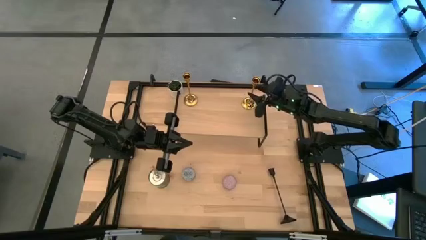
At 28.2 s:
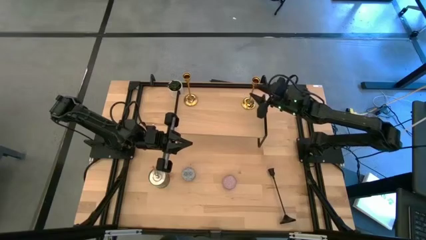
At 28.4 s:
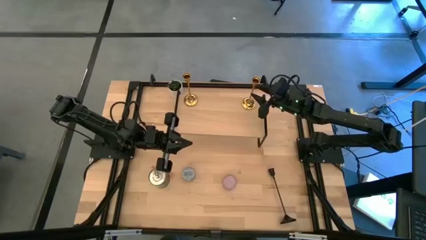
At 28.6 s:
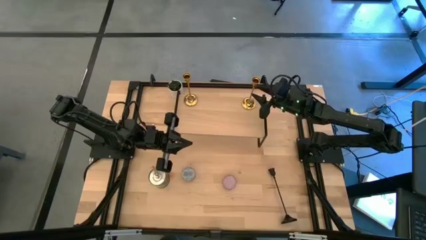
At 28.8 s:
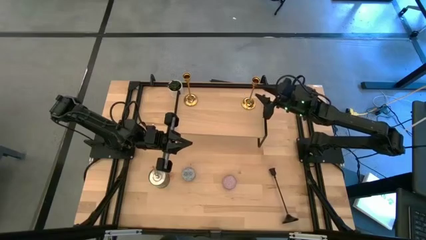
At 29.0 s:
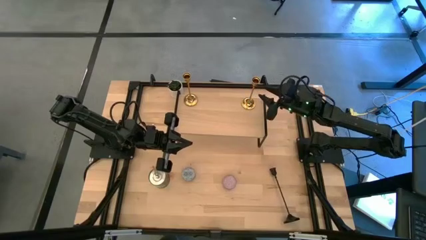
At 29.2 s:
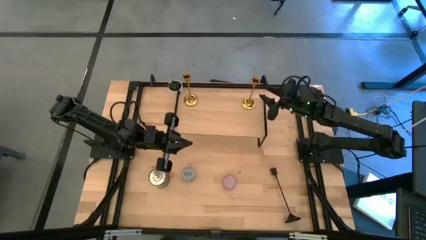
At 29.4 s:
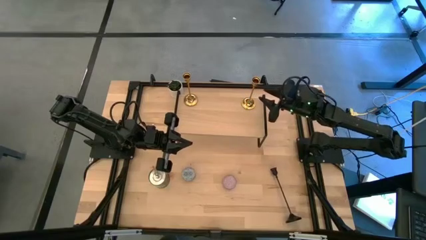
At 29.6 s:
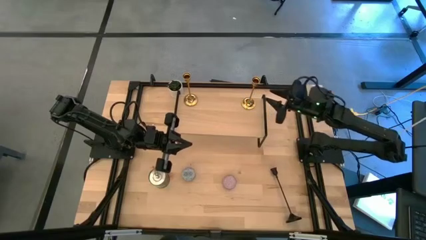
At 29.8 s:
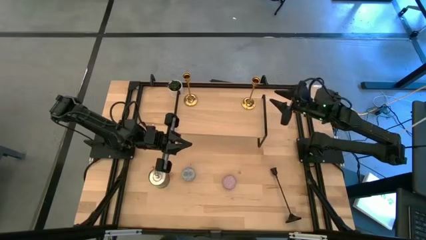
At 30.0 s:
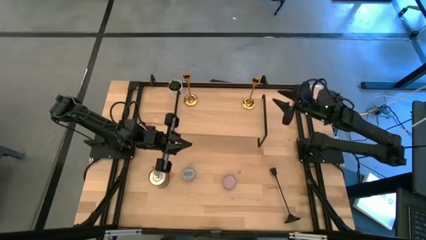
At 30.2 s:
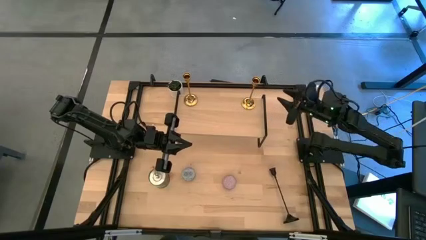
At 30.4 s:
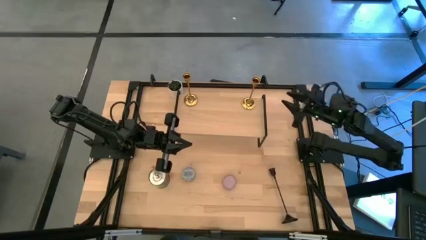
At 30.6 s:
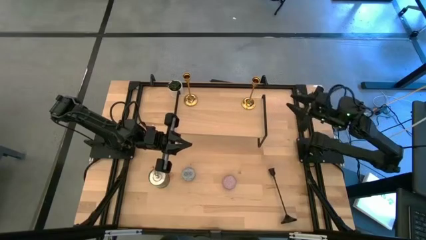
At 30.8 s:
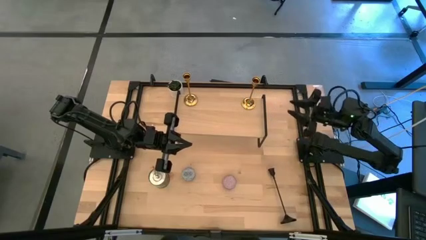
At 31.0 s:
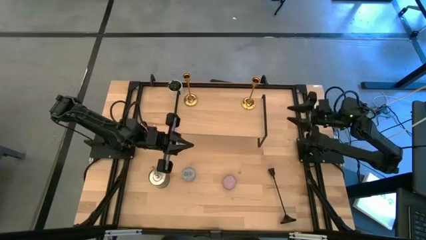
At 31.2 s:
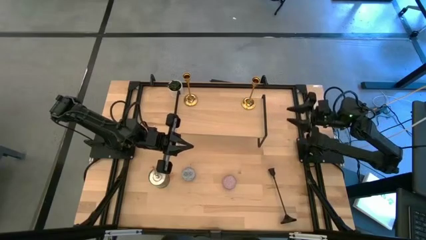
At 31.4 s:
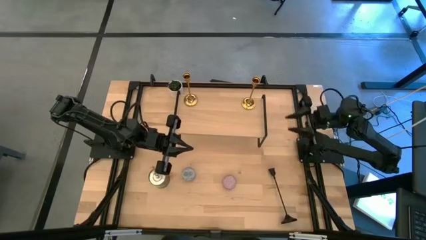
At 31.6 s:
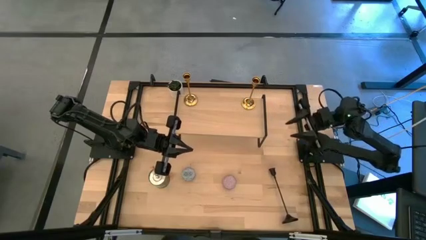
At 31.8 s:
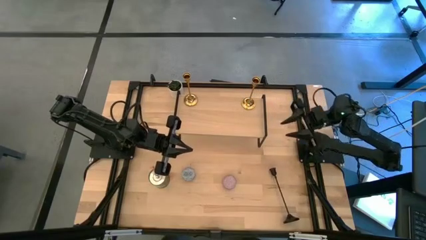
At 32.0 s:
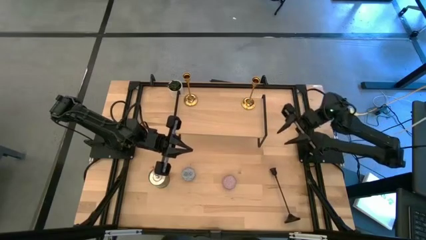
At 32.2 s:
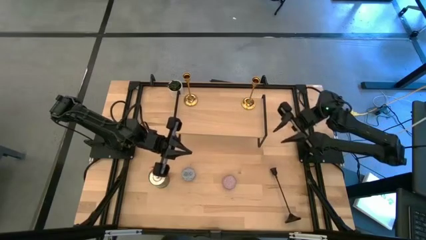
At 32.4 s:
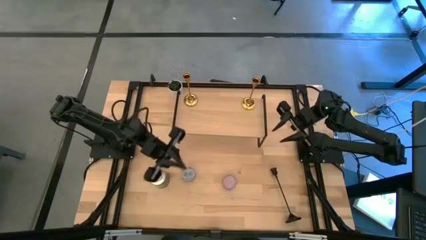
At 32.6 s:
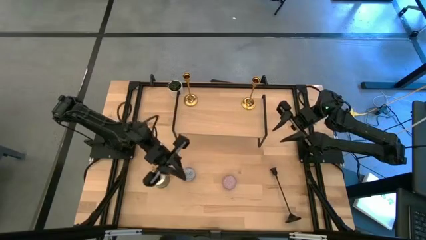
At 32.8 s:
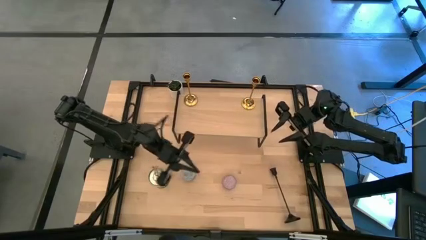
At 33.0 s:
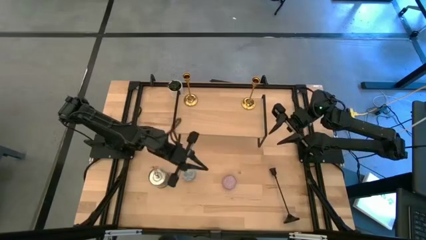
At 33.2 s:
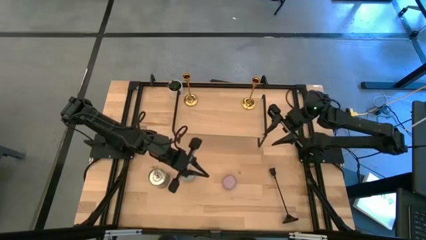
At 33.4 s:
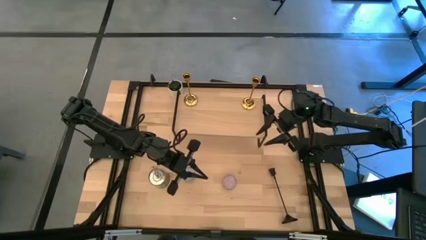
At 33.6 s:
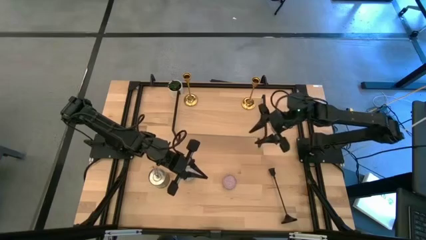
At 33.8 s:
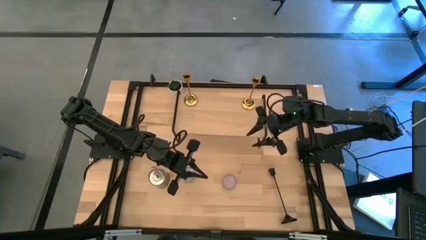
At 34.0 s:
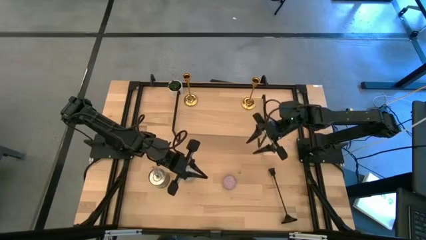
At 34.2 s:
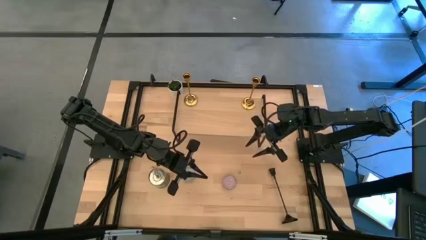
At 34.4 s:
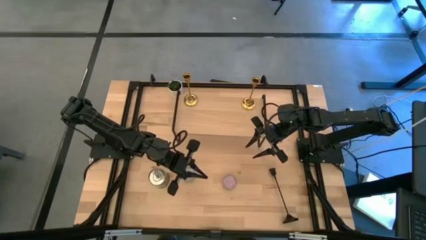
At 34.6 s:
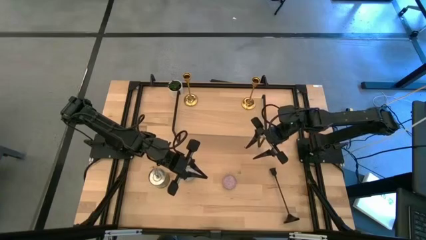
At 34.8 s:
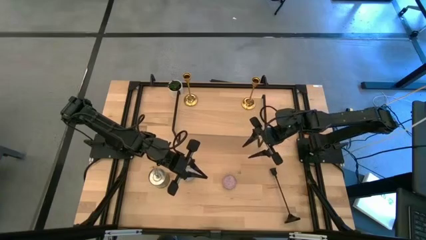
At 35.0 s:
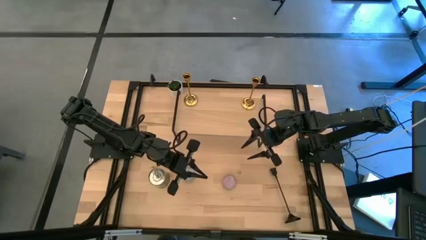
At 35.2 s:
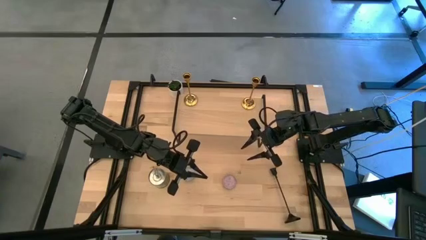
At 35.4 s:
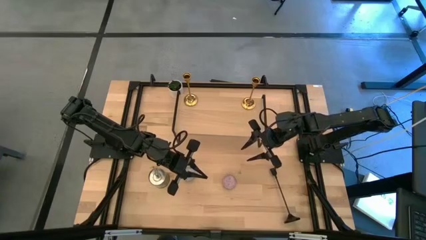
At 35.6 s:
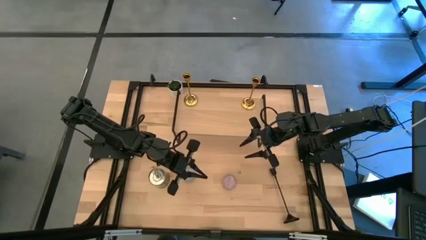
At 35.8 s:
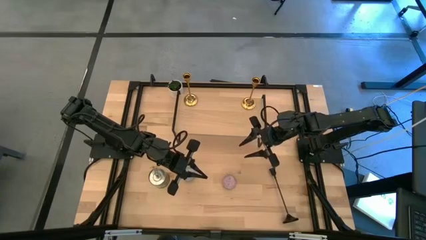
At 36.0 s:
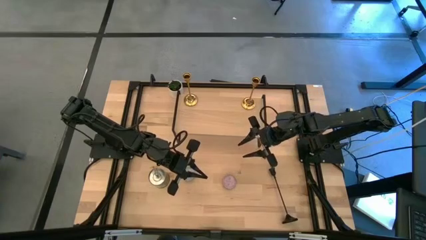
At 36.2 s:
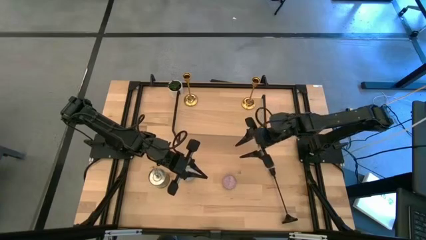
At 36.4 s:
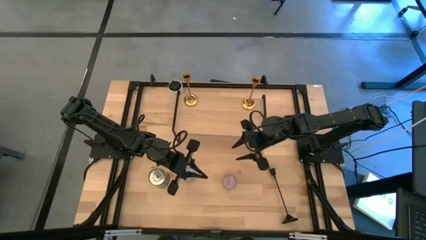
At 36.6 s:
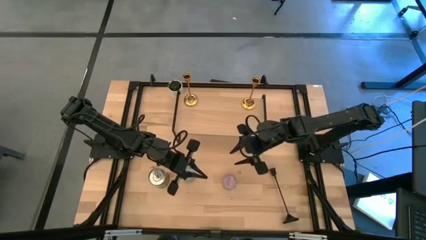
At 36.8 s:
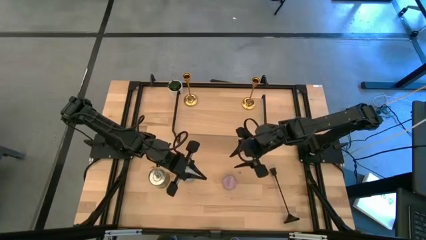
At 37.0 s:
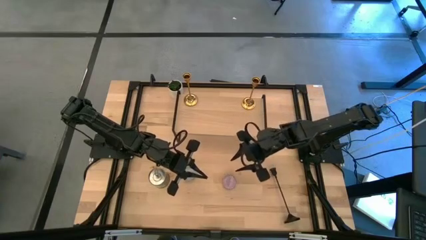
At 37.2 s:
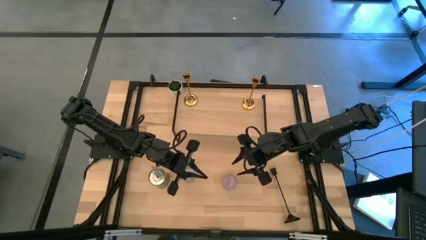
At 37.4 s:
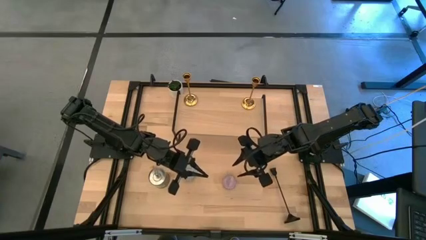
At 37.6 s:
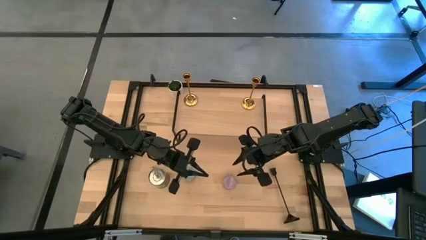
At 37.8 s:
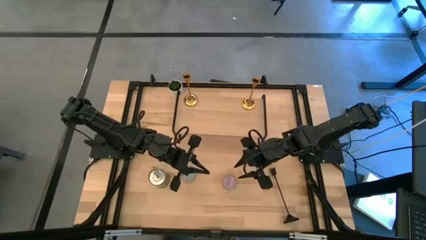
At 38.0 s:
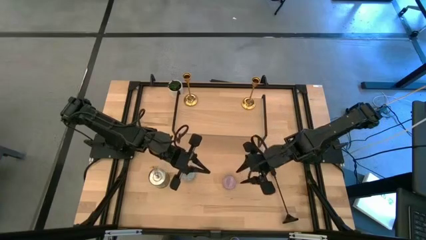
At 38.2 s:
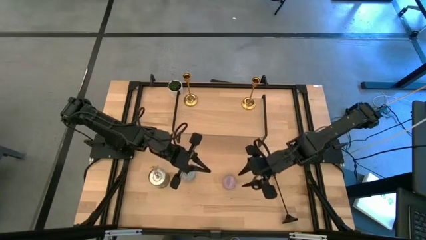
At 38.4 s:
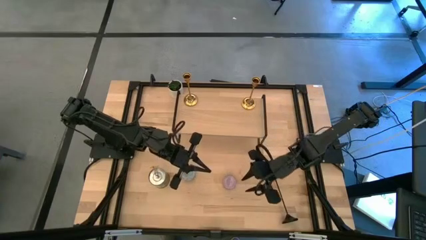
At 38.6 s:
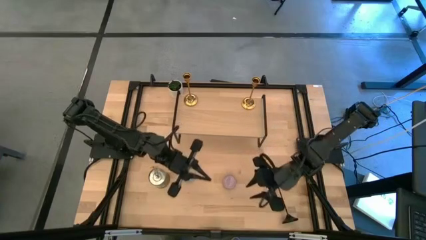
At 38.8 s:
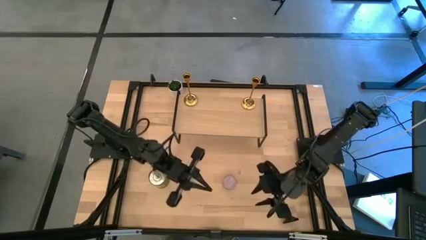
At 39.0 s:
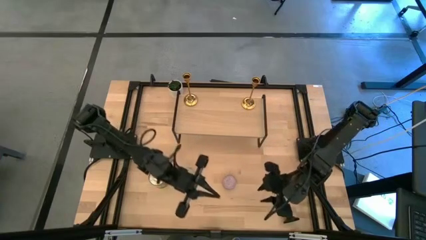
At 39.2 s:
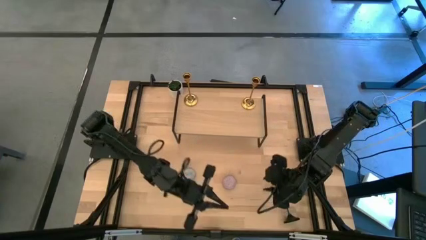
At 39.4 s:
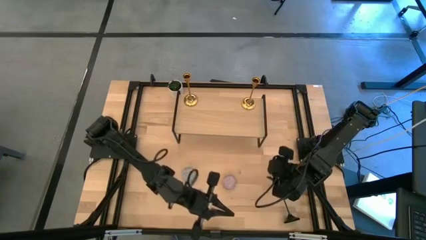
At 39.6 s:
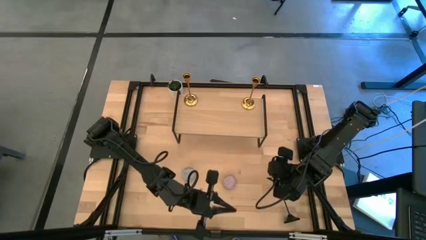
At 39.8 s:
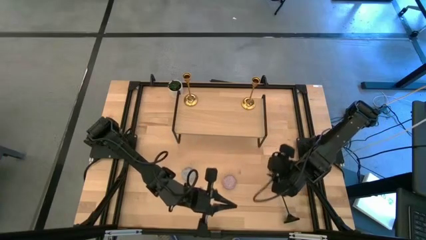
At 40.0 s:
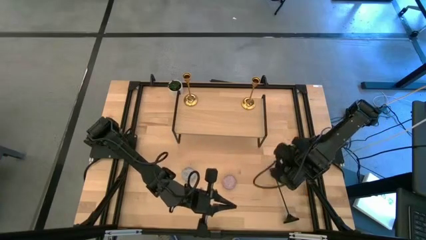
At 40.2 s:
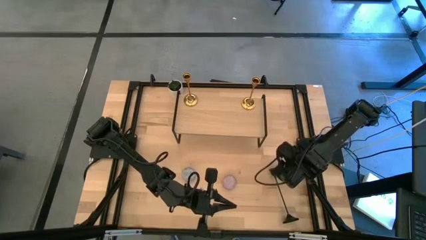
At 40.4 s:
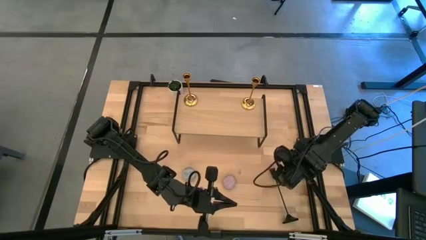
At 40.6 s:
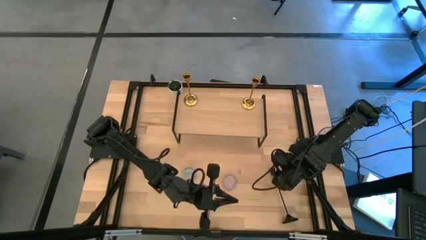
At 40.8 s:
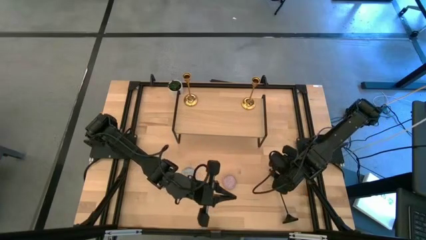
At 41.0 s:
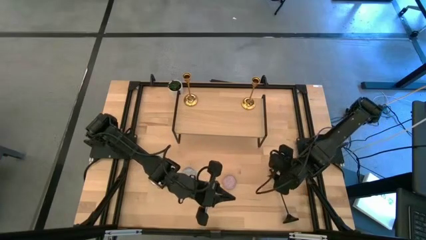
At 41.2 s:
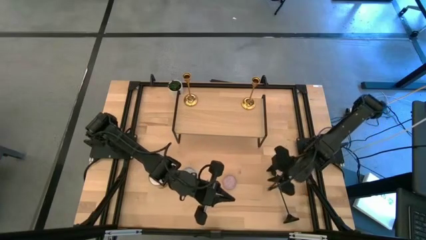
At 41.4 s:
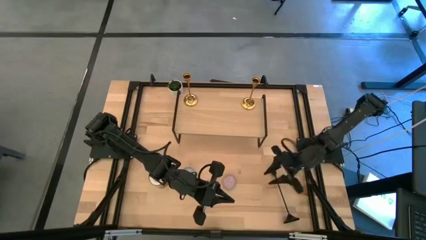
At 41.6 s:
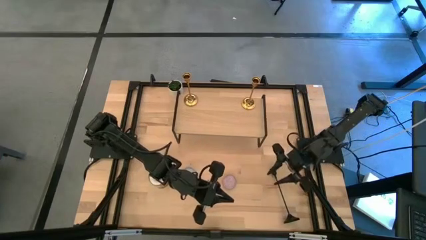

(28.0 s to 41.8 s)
Task: Pick & Place candle stick holders
Put the blue scented candle on the shelf
